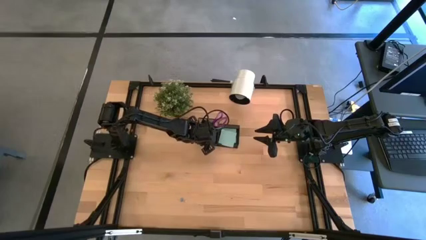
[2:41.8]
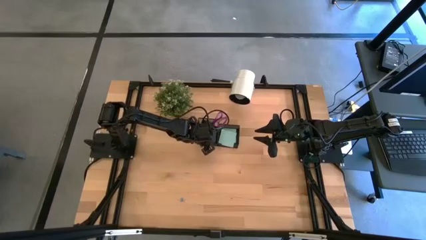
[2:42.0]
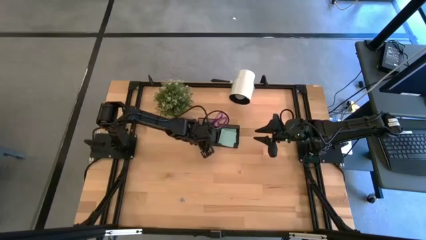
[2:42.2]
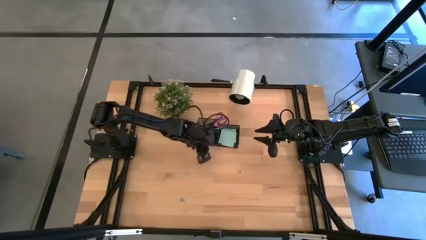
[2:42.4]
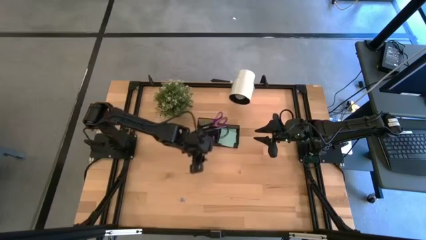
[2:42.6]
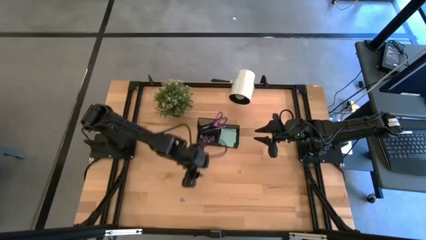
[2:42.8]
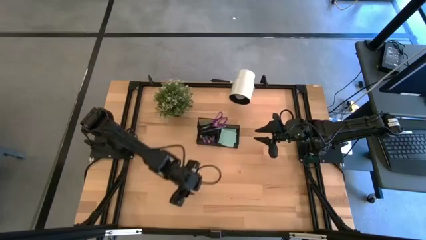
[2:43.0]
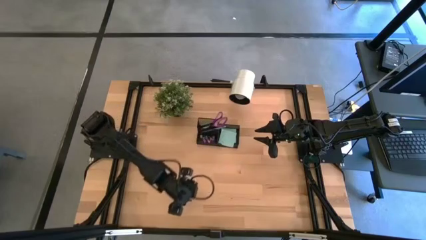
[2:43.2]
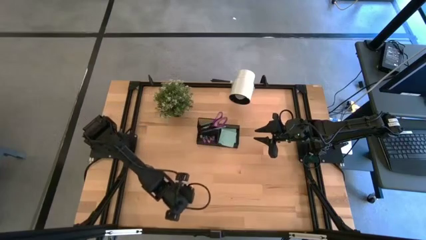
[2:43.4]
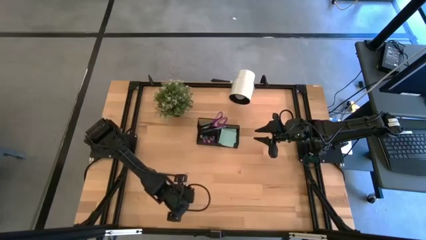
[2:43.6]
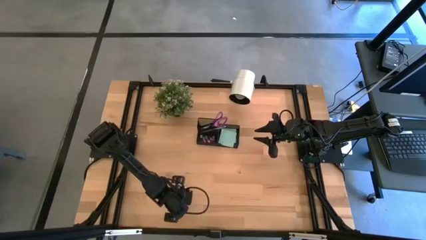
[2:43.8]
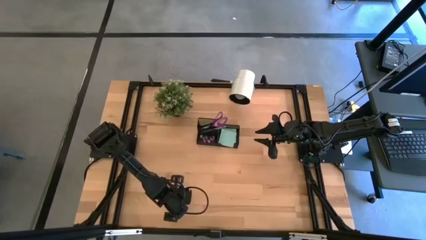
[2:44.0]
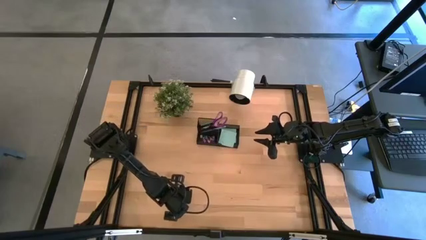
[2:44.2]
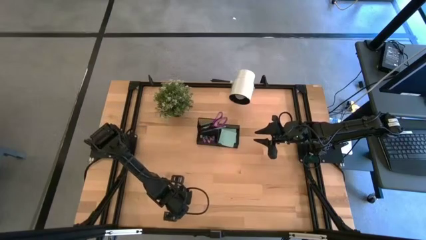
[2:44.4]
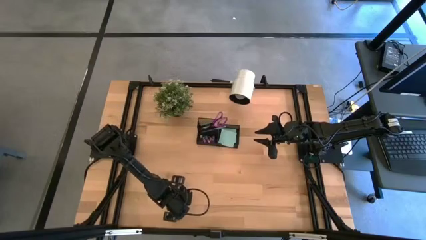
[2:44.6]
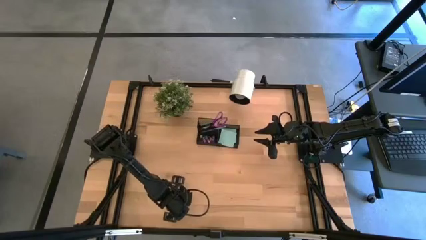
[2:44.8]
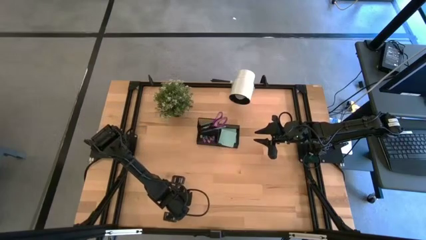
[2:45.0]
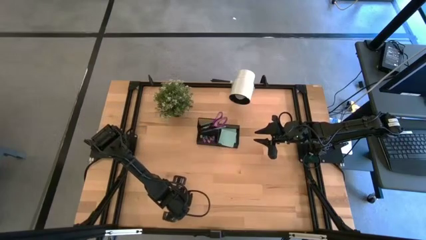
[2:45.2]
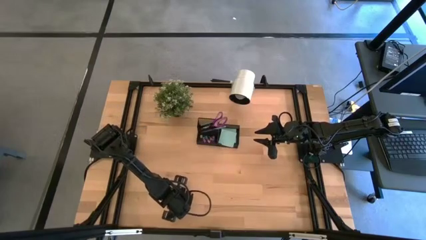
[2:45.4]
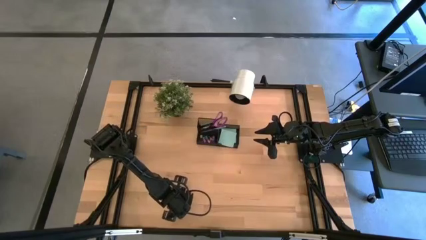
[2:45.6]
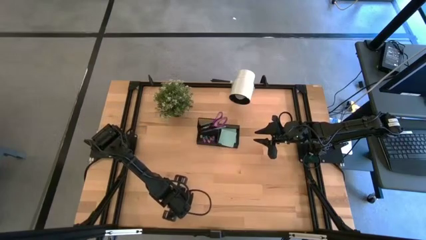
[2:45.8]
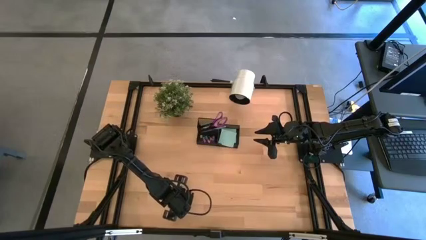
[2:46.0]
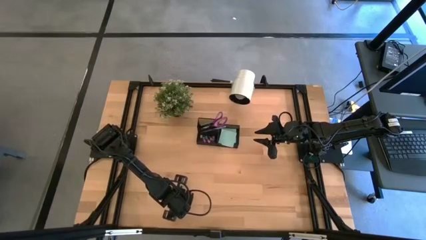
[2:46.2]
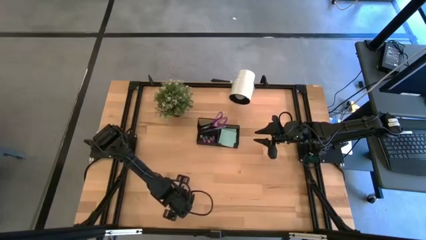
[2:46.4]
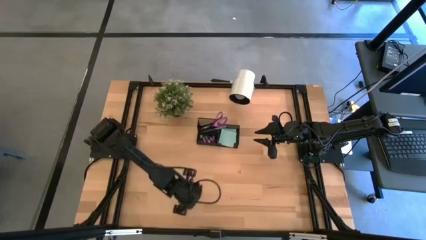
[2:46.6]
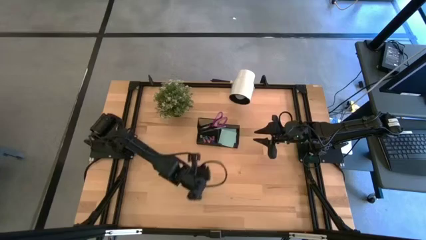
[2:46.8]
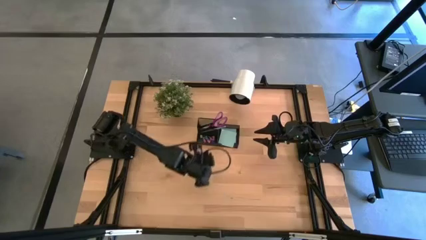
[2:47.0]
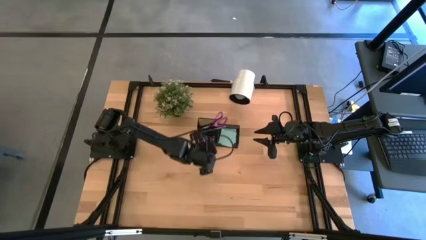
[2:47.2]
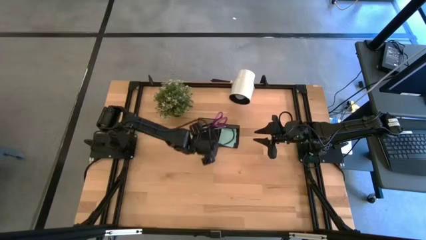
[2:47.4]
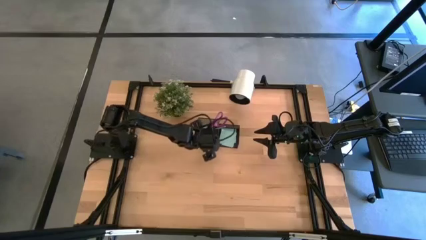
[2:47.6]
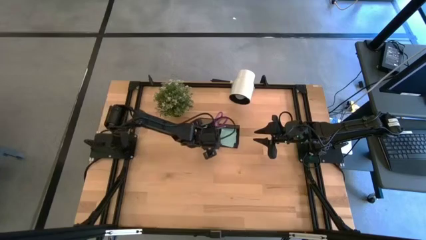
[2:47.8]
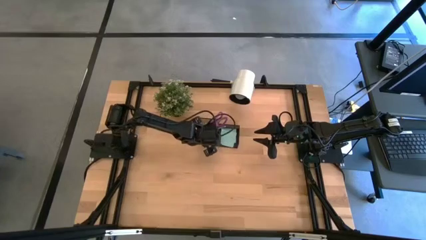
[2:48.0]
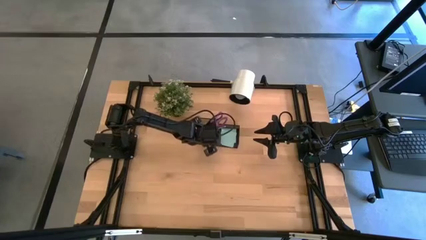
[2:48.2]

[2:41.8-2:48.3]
Task: Pick and place office supplies into organizer
Put the blue binder clip into the black desk organizer

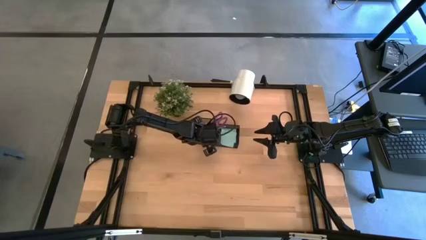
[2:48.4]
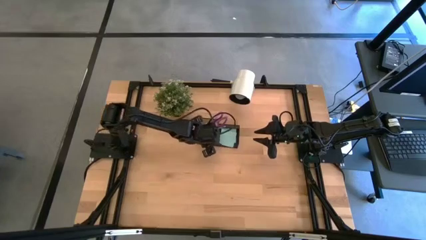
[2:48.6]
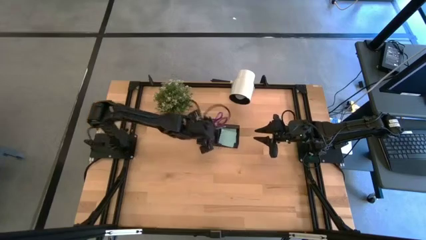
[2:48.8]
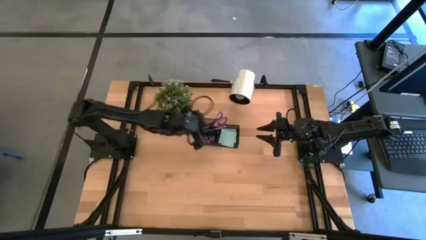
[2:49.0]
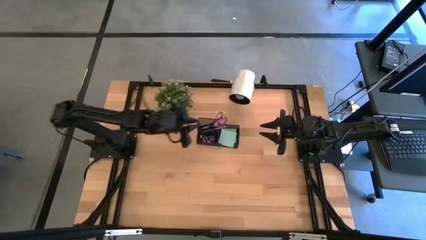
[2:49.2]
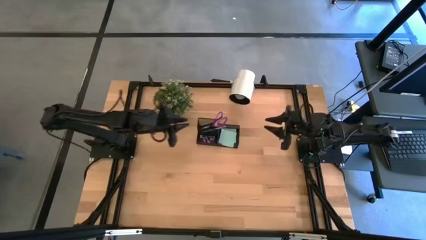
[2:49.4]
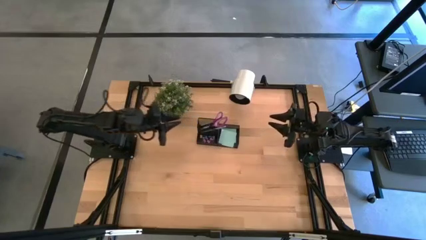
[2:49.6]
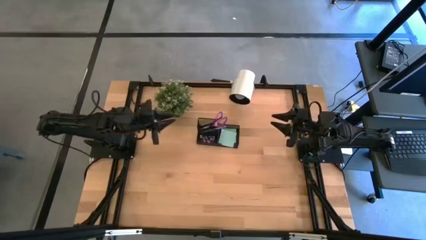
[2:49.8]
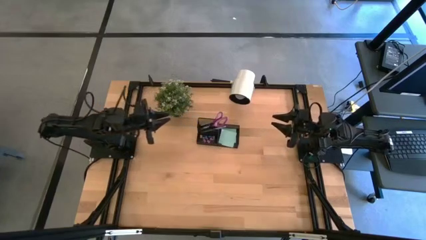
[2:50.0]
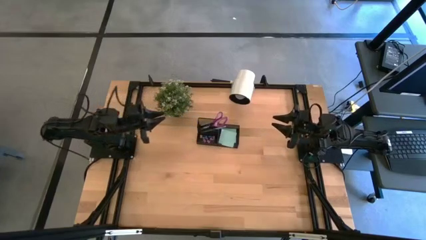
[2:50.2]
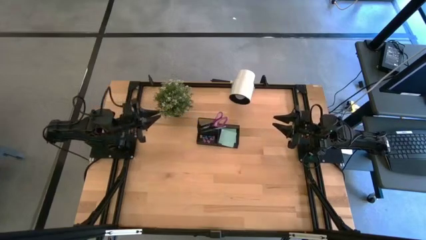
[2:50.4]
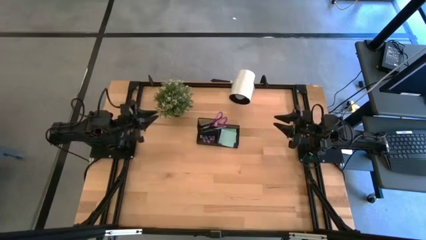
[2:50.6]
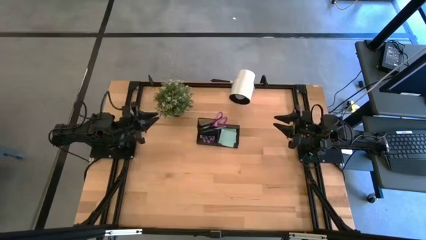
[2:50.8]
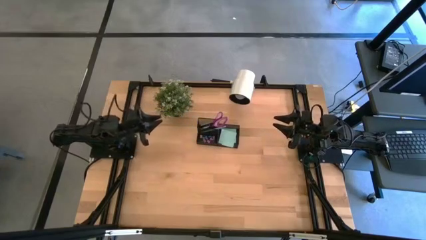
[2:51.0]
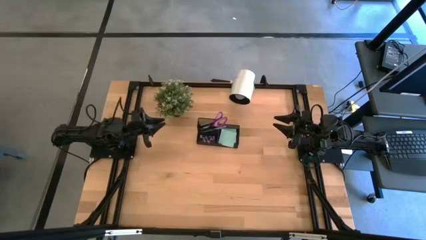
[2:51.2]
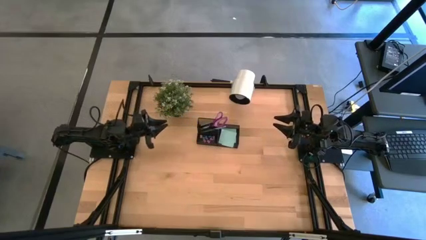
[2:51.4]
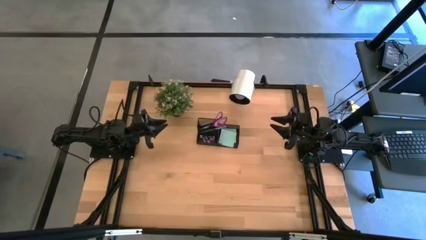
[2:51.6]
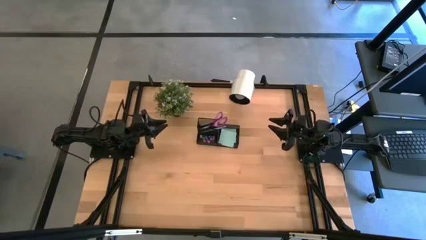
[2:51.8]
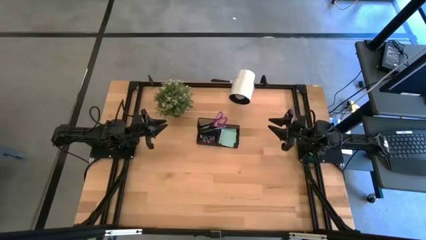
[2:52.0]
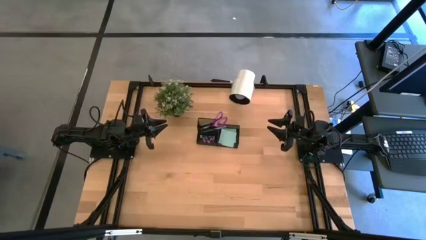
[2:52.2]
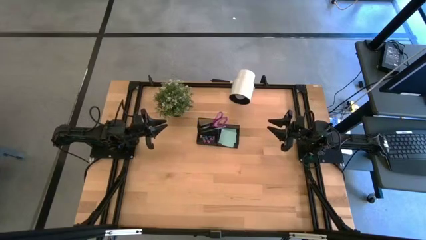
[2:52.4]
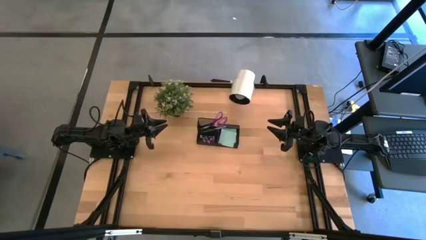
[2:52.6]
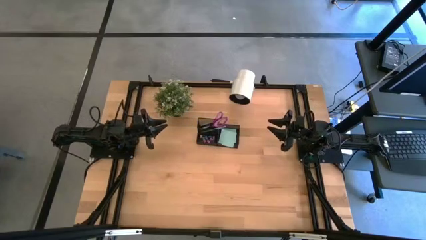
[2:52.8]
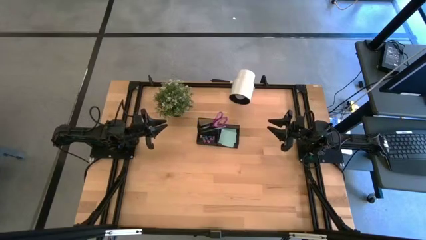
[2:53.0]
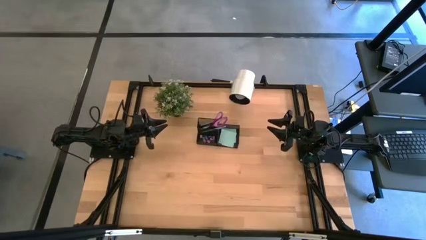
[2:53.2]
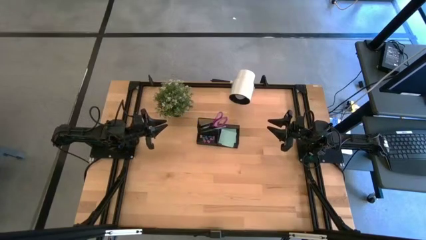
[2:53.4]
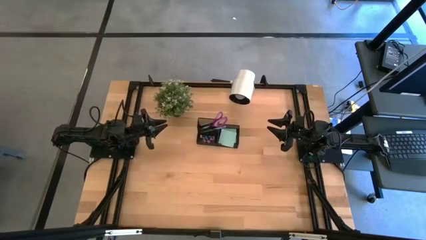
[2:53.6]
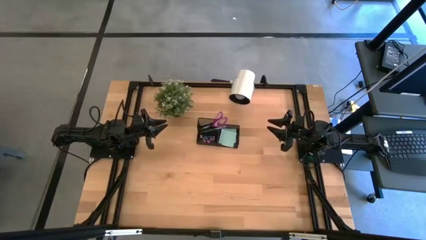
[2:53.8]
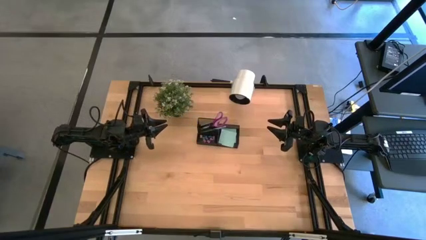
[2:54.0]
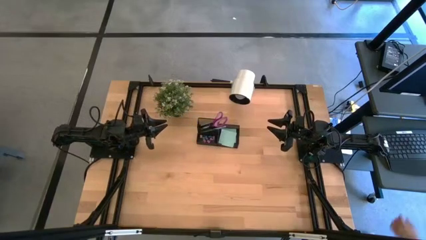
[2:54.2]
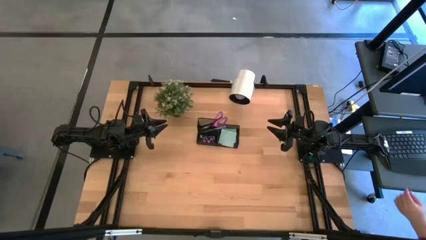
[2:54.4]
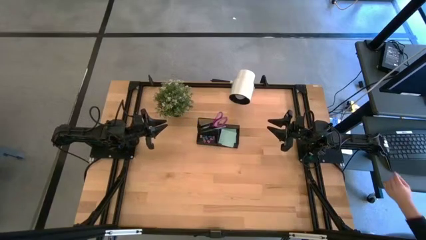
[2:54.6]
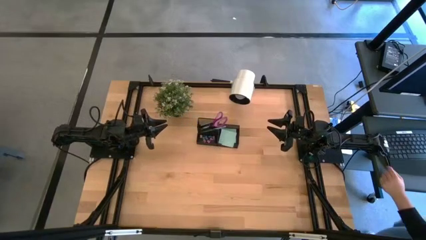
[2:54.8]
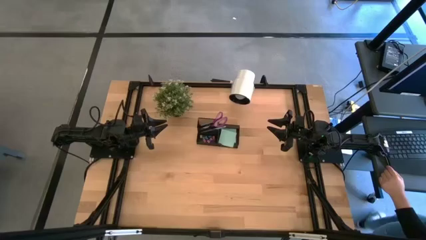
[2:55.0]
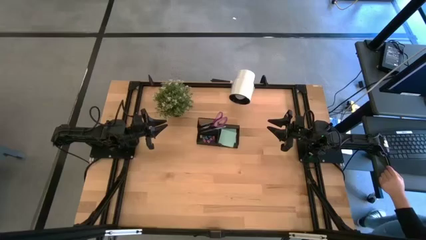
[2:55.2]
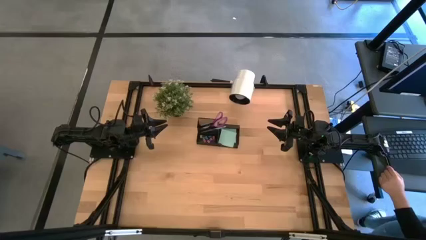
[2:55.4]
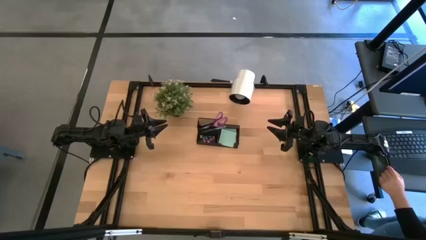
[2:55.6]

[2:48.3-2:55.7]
Return to Home Position
